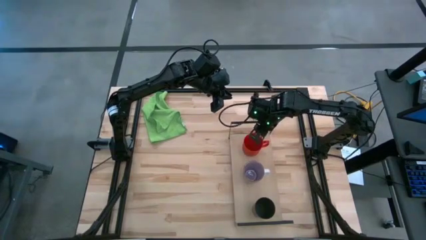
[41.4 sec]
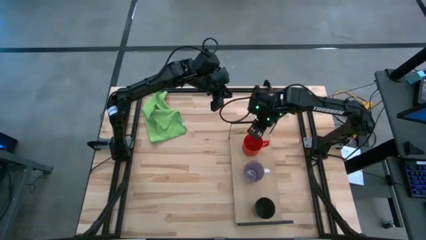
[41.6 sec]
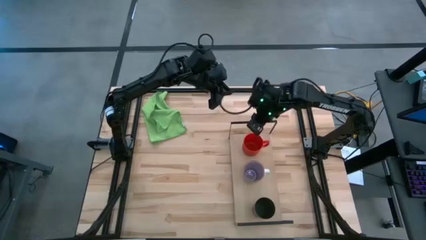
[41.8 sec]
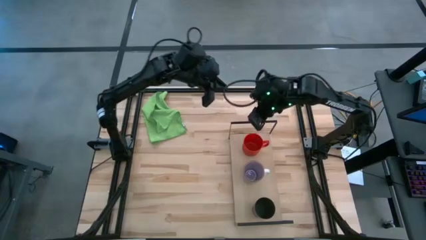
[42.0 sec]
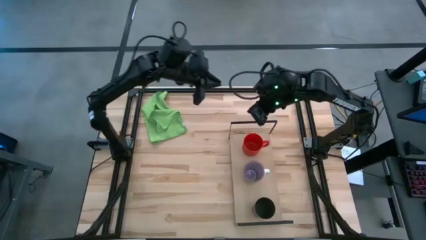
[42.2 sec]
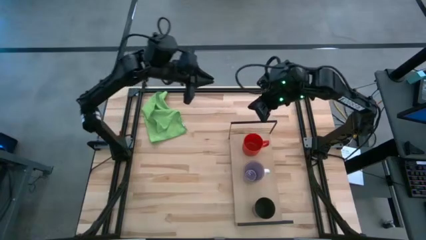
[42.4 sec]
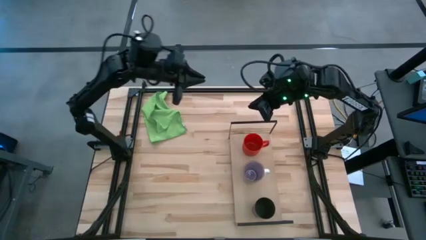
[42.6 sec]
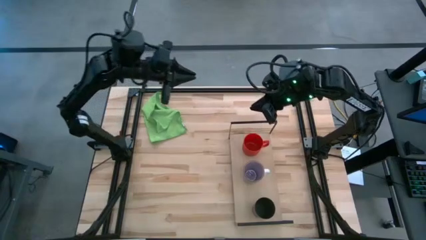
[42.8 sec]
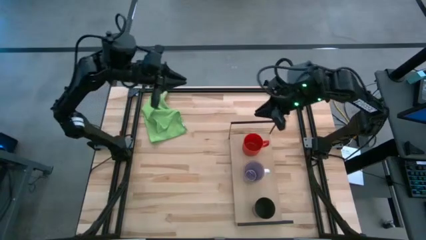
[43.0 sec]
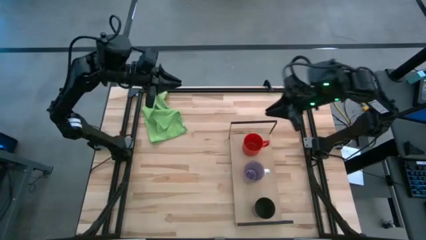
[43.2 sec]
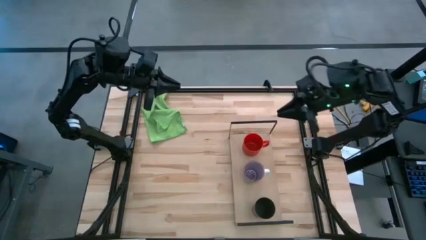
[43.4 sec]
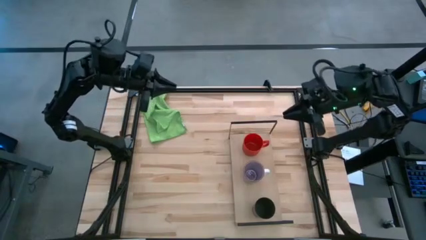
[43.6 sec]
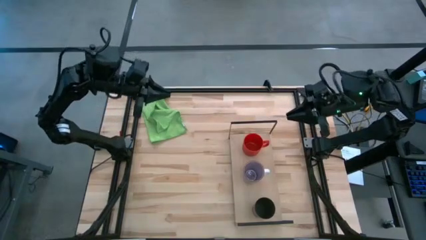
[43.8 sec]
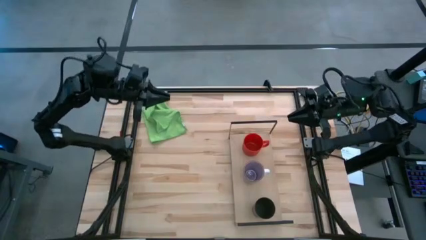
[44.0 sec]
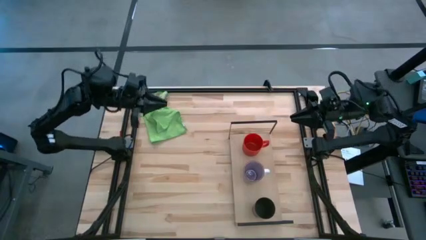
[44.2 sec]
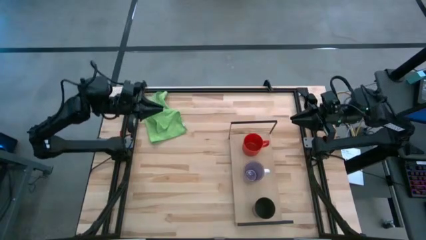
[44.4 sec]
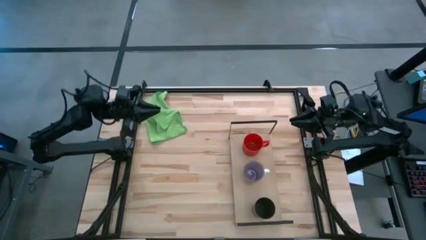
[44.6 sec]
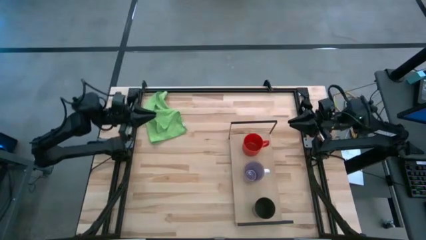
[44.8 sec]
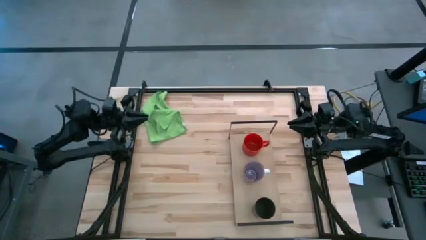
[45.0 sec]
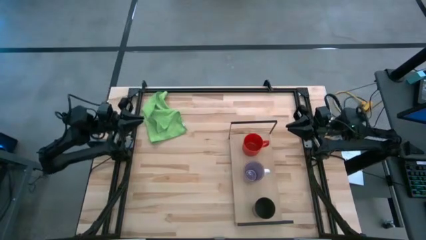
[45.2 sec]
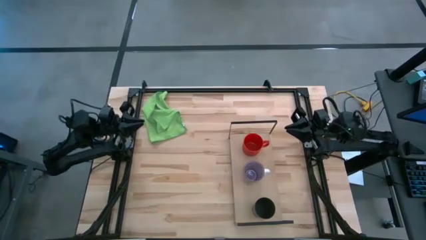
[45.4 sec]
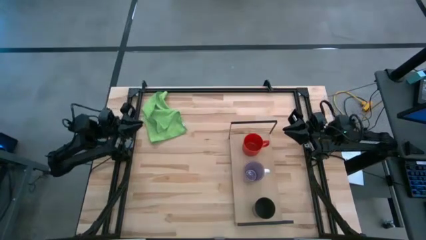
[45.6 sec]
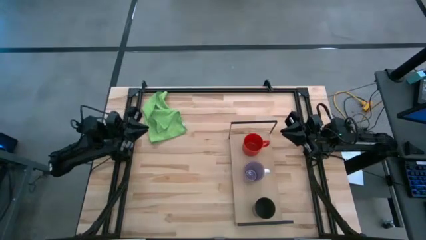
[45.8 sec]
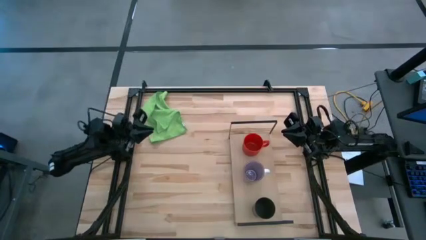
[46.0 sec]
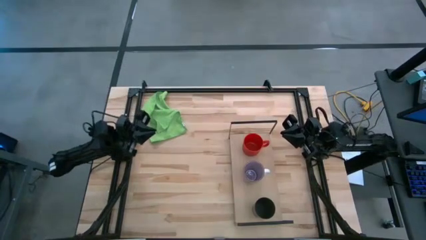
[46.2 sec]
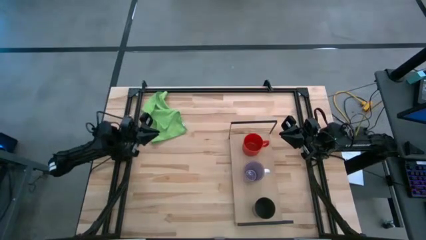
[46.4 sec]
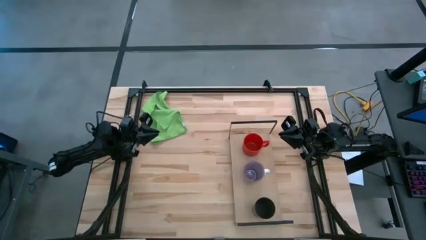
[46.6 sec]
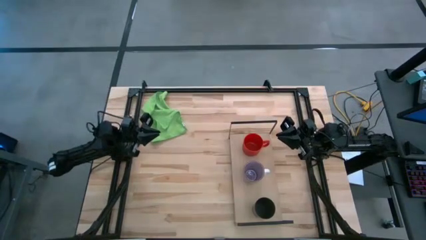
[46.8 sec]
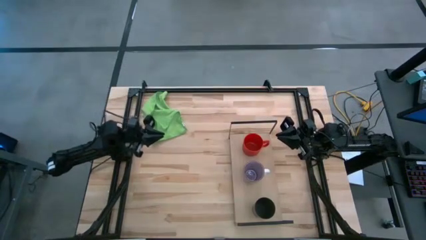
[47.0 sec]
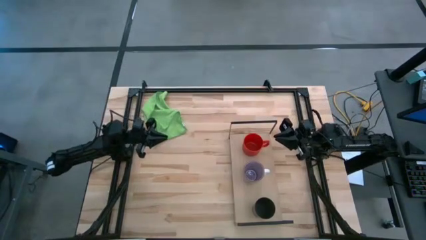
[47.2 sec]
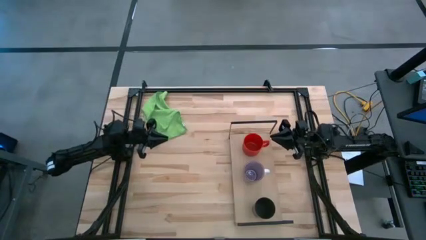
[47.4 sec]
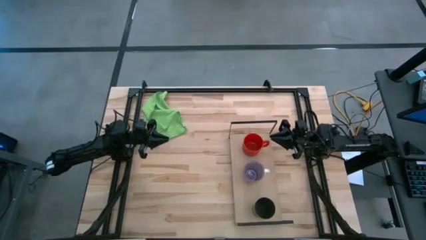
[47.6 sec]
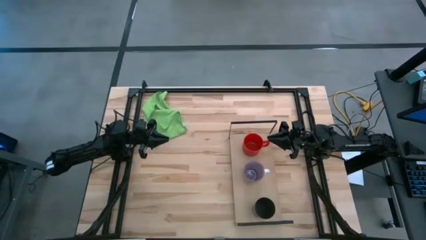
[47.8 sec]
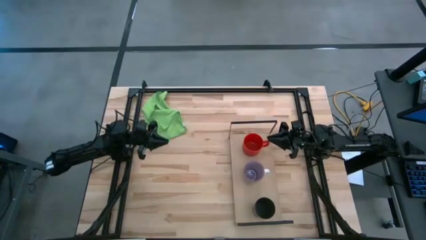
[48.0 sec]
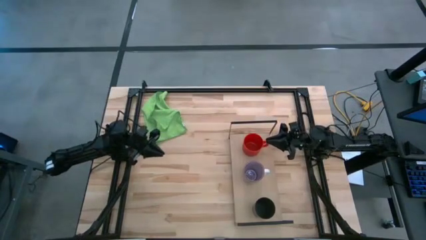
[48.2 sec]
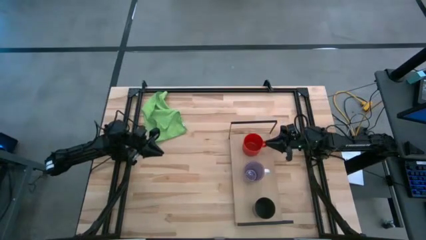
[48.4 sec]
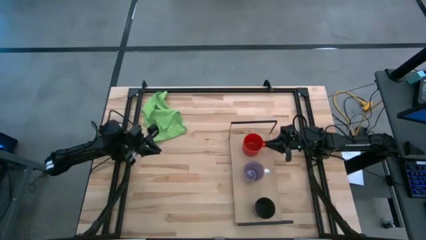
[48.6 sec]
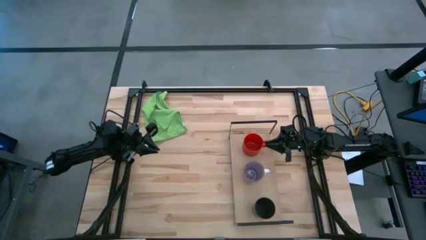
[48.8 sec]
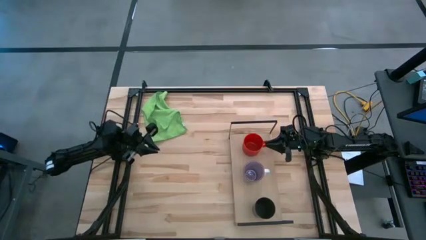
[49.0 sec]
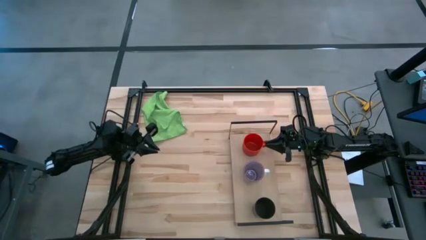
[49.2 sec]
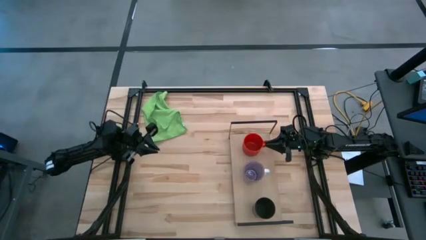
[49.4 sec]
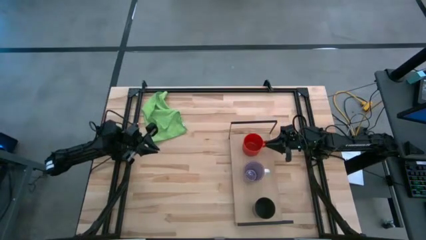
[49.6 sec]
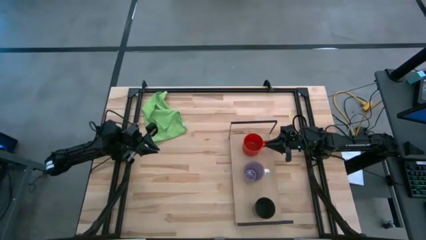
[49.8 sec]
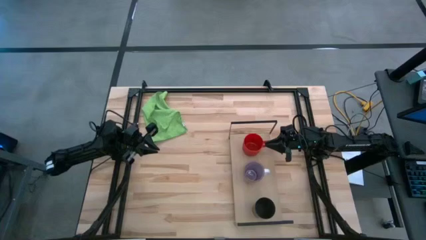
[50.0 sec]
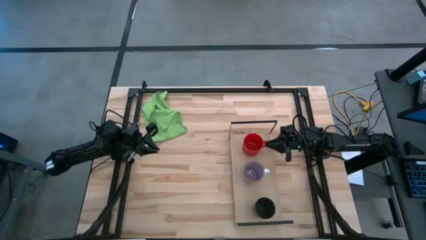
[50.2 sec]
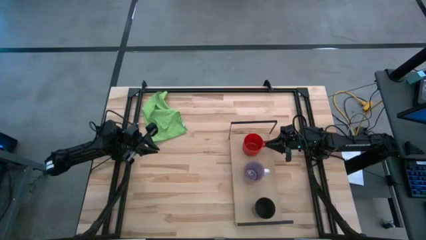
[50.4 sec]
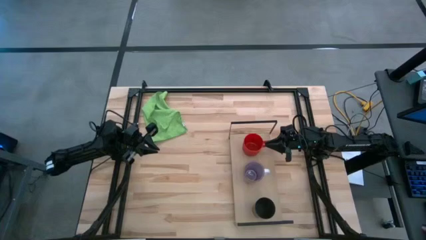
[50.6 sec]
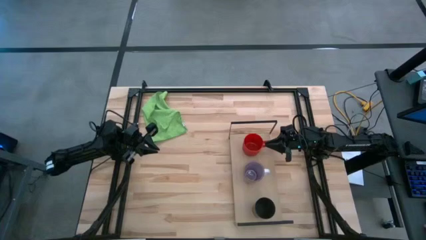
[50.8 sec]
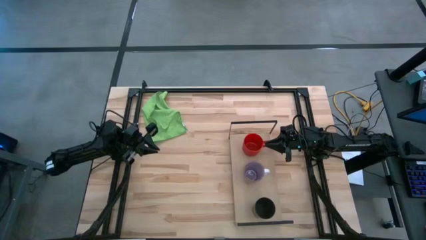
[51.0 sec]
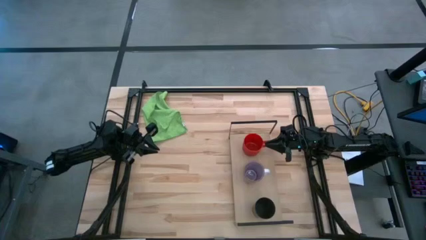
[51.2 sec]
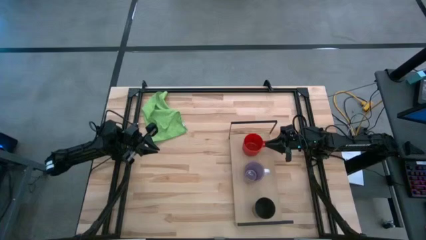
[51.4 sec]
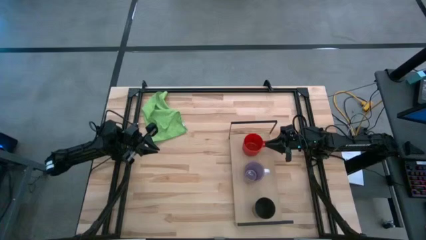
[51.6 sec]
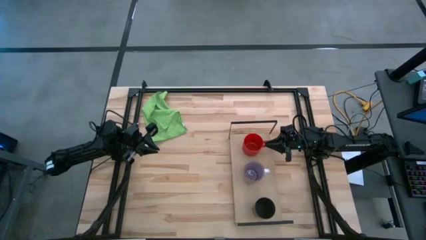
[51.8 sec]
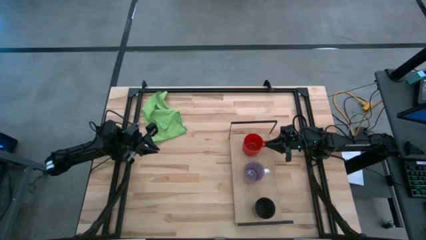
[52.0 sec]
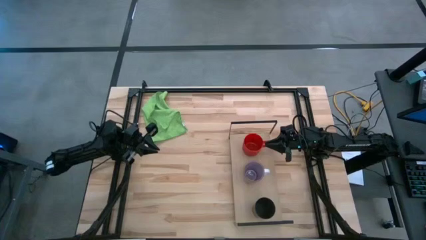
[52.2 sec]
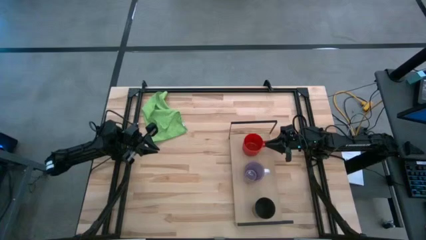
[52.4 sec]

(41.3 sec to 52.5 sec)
Task: Stack small to large cups/mugs on shelf
Return to Home Position
